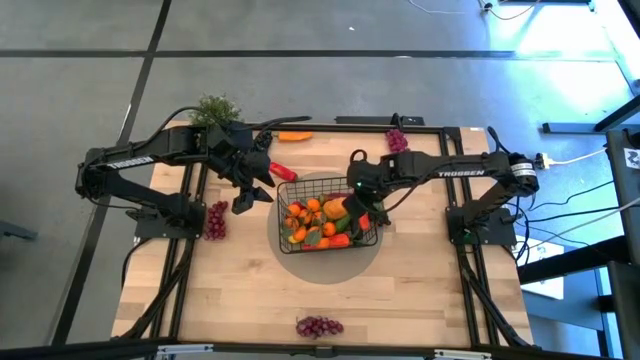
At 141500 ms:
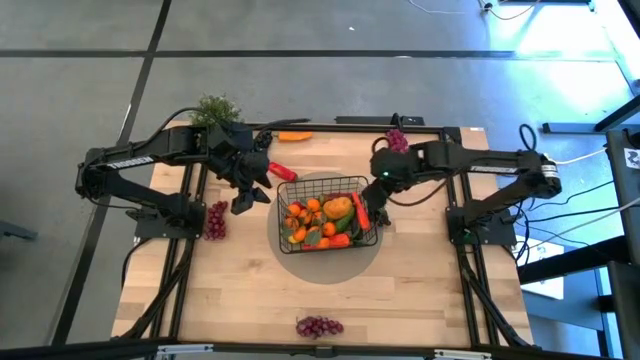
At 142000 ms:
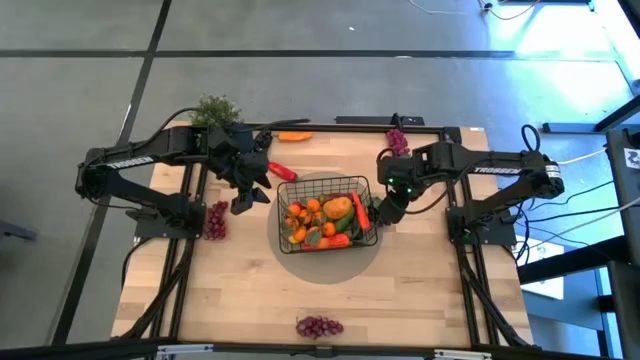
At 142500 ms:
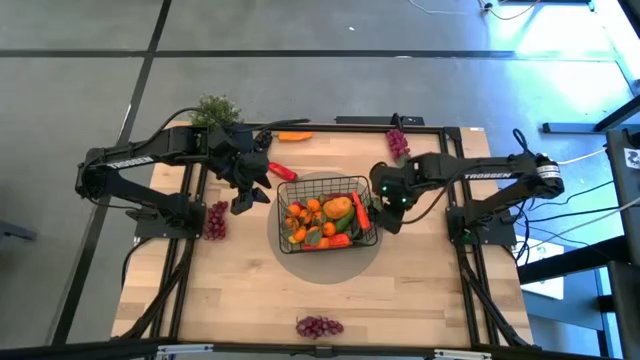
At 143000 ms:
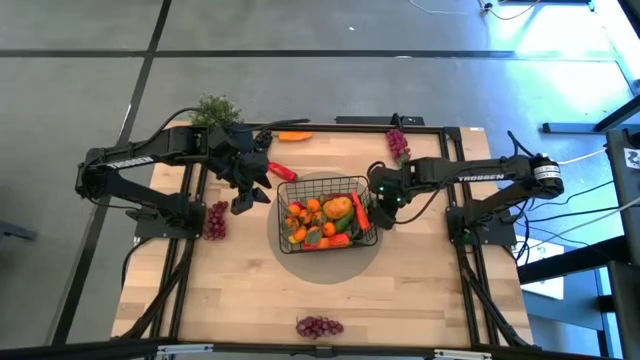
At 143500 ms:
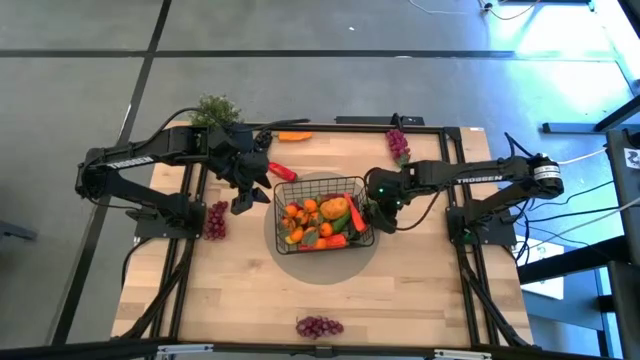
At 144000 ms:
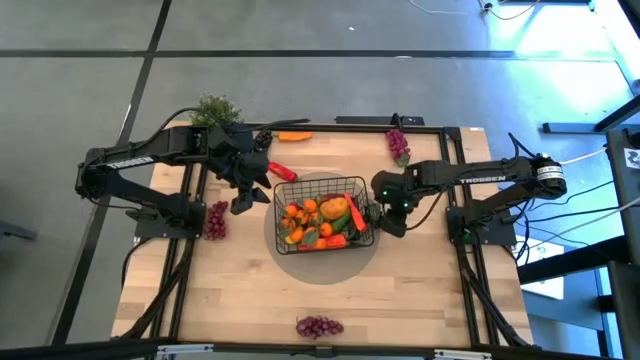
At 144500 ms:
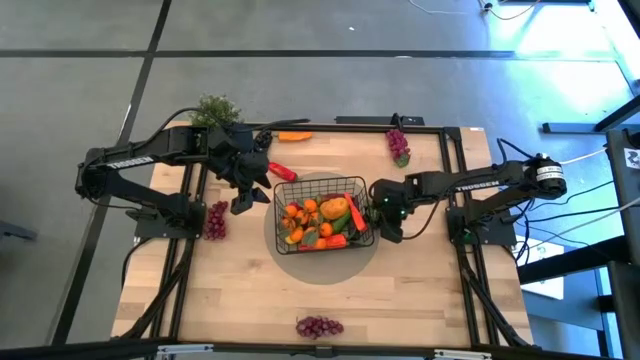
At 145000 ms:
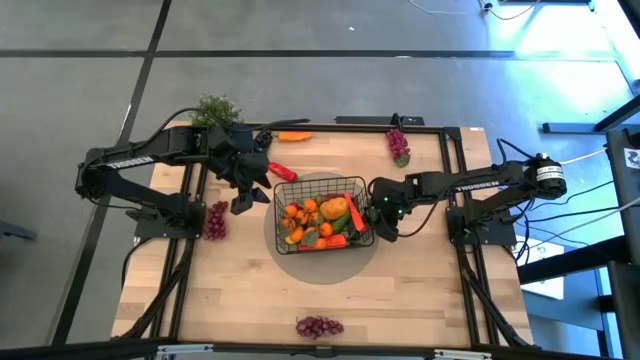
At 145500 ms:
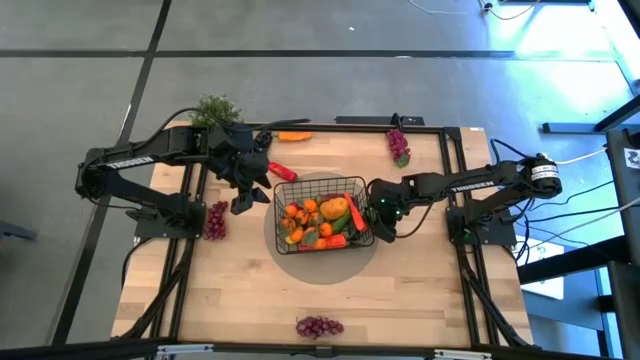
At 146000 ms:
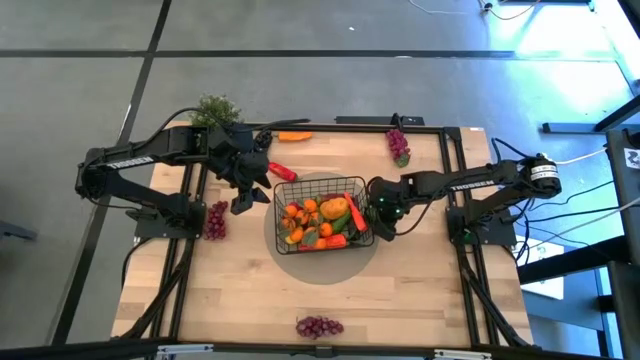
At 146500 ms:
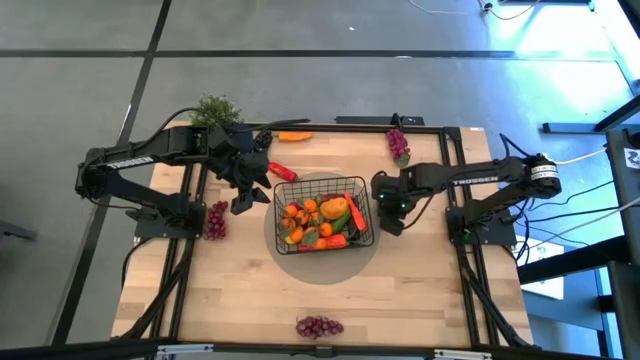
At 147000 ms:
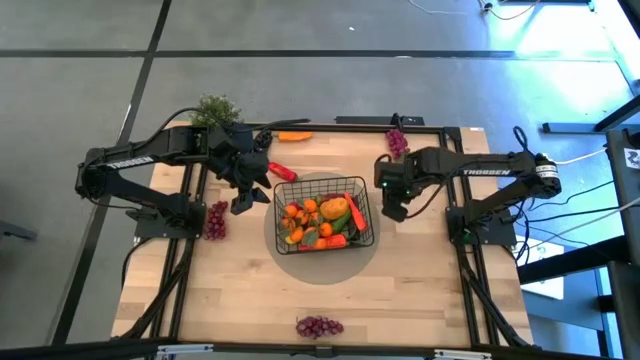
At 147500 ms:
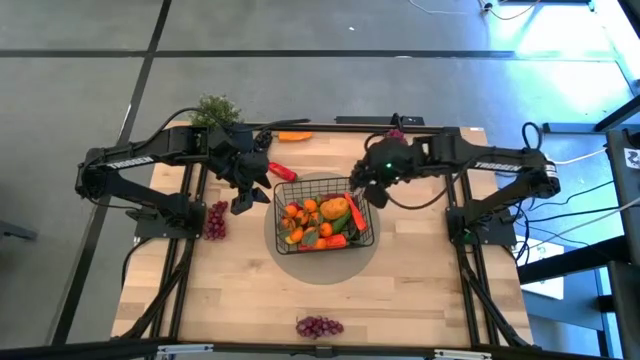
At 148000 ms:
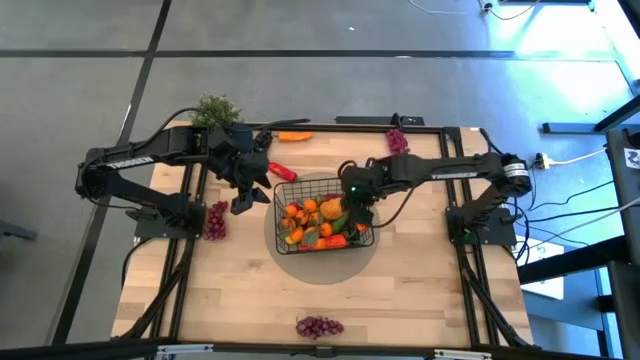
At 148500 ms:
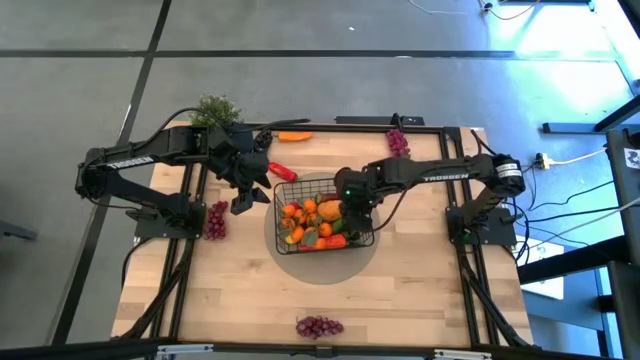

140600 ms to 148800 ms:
Task: Build produce basket
Put the right dark blue grape into the basket

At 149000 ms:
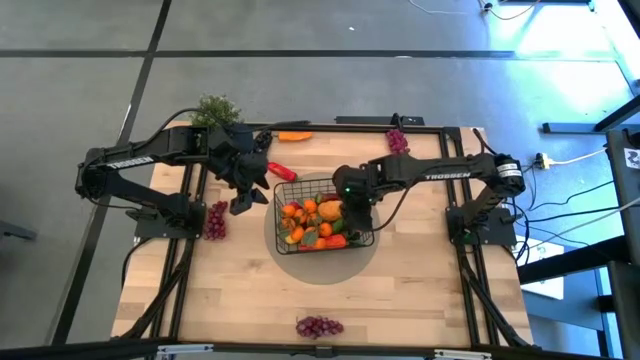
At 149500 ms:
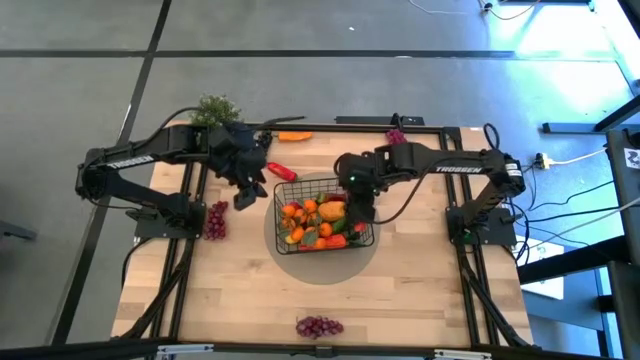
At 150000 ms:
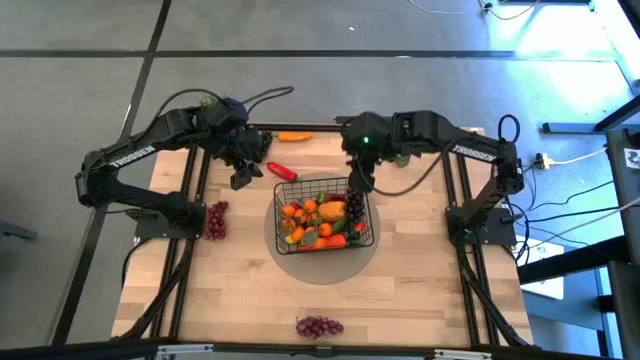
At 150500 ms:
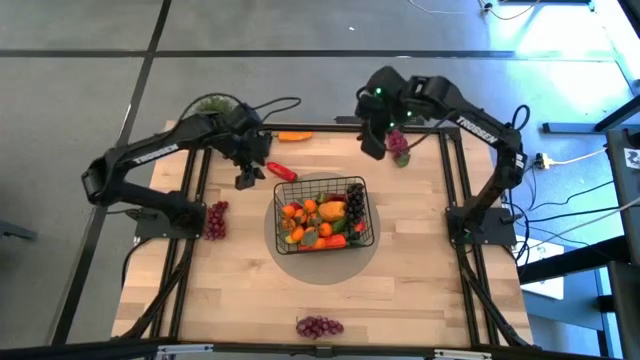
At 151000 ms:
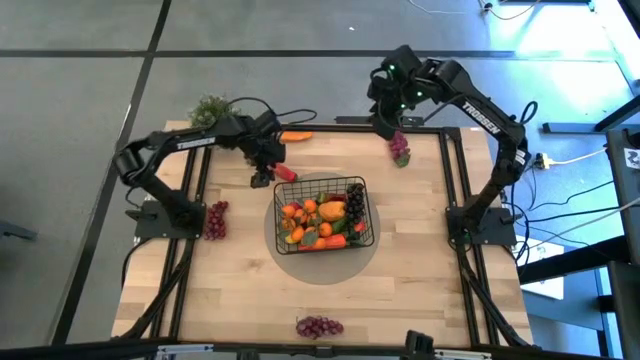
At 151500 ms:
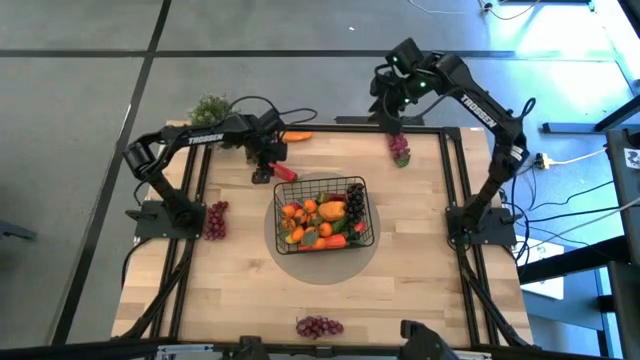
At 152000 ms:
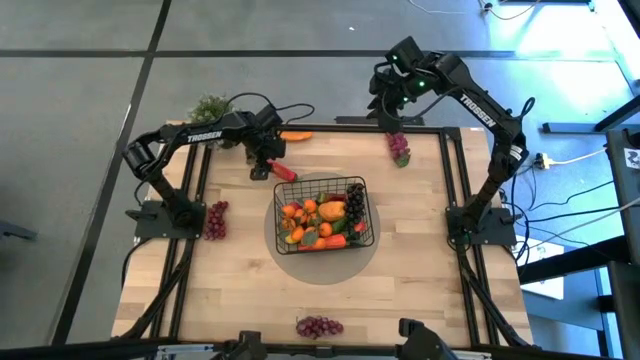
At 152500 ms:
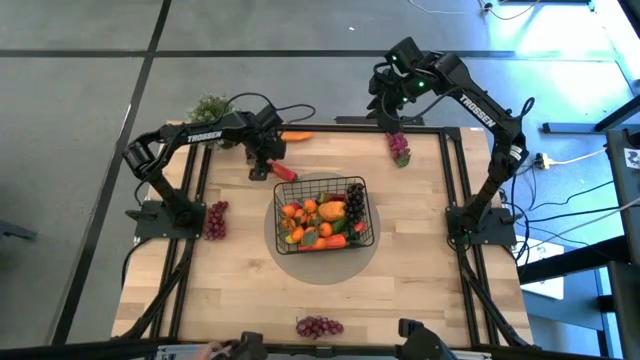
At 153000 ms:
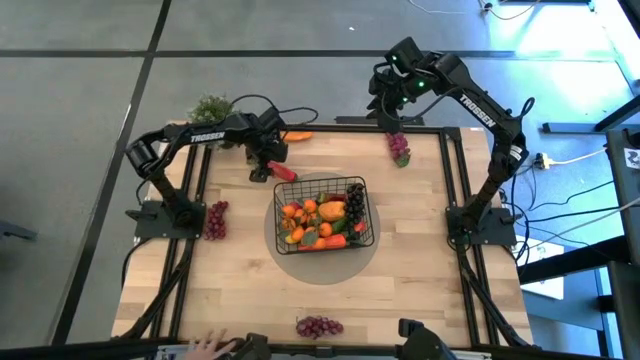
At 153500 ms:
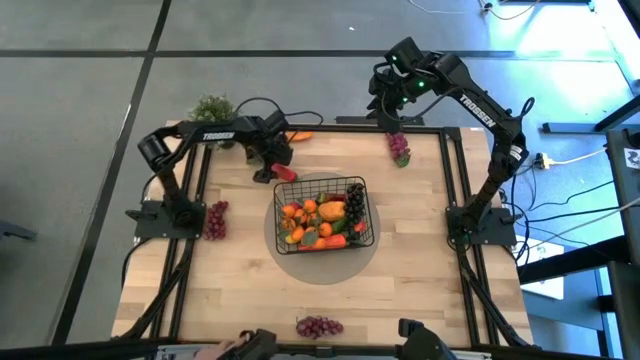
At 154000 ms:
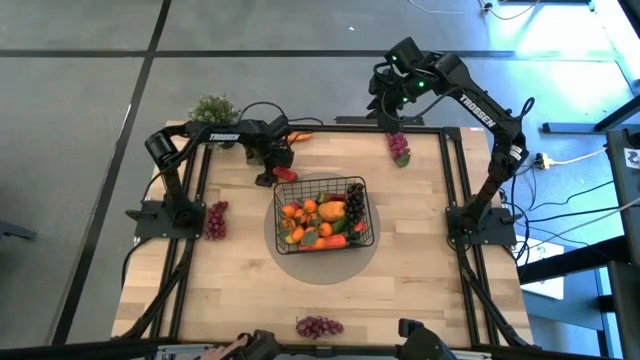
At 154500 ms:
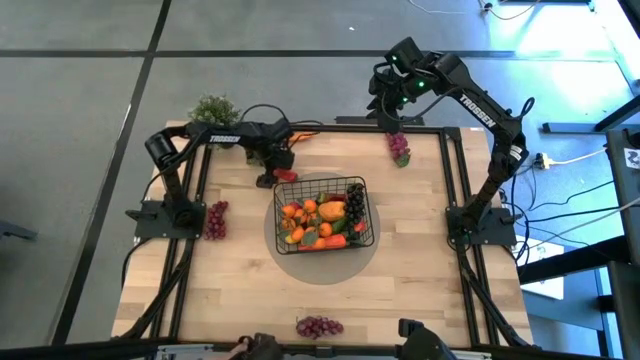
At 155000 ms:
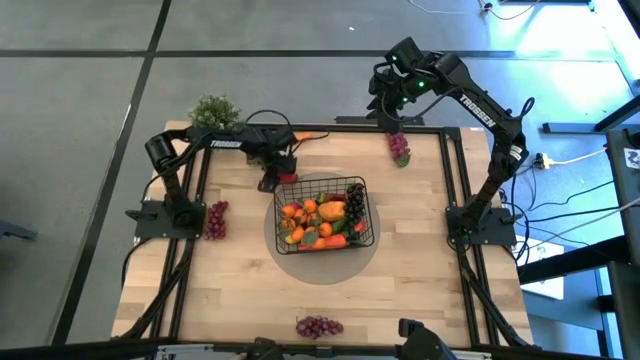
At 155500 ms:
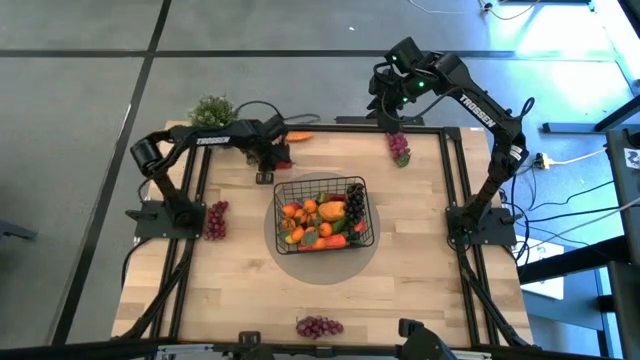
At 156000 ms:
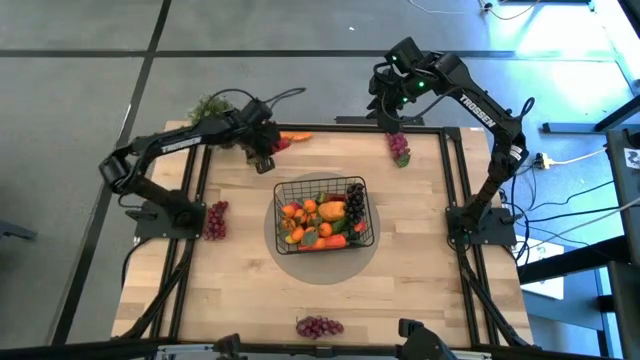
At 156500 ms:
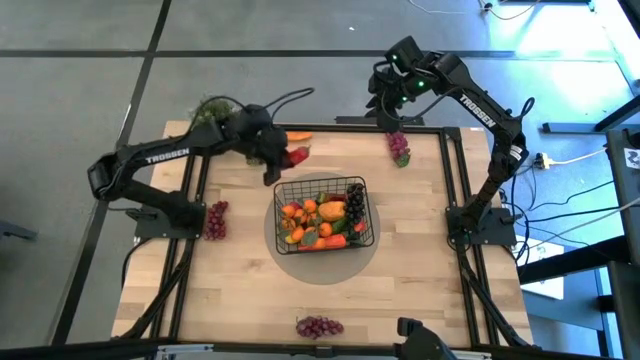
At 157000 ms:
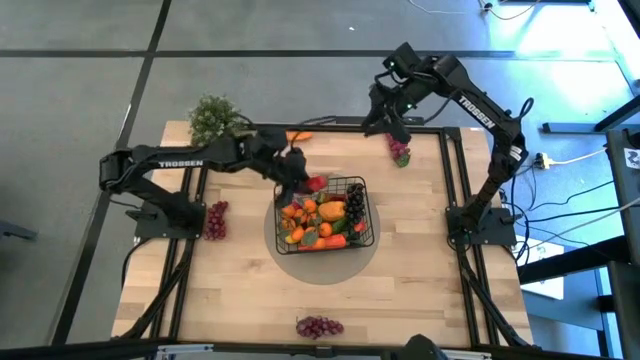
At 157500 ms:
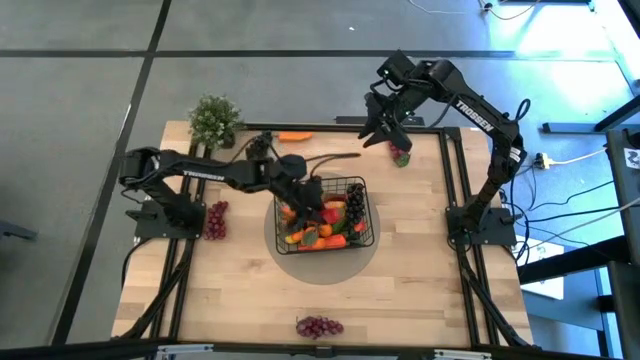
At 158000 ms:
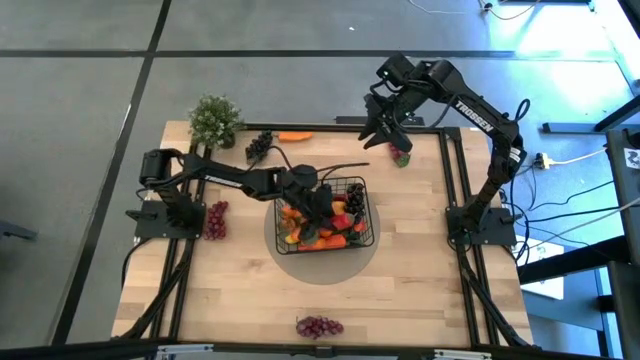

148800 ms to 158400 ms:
Put the red chilli pepper into the basket

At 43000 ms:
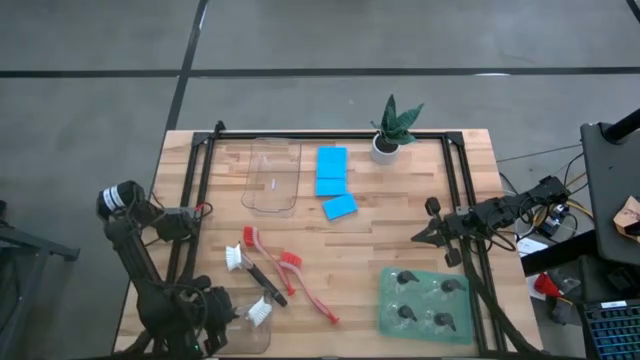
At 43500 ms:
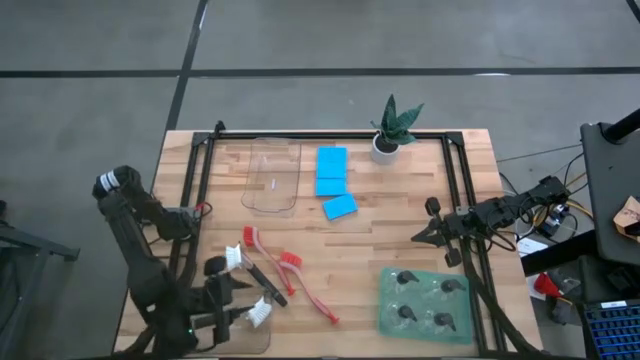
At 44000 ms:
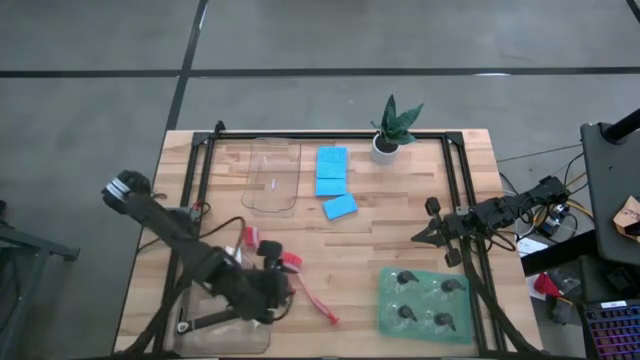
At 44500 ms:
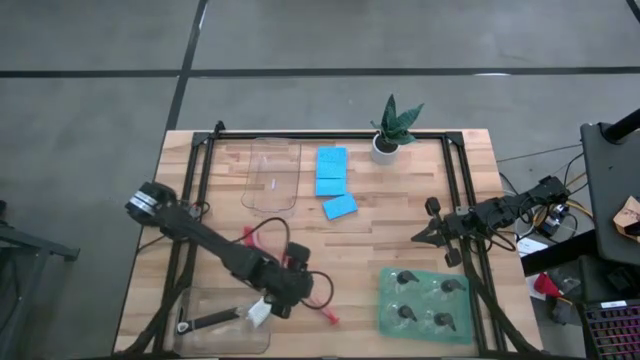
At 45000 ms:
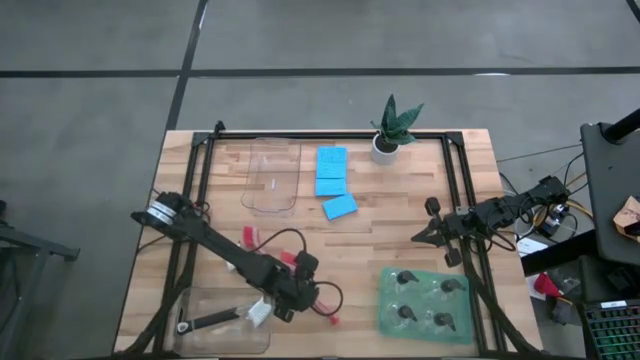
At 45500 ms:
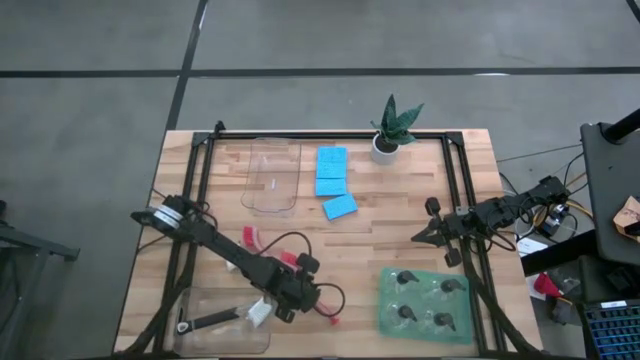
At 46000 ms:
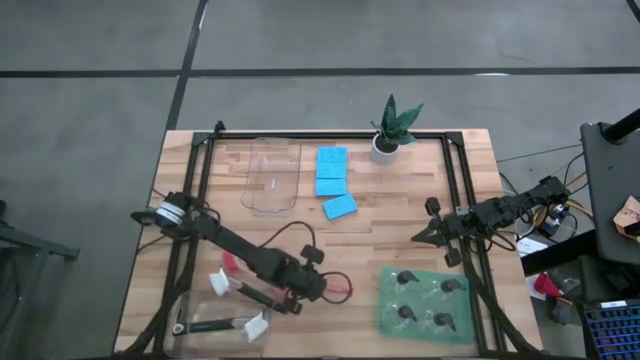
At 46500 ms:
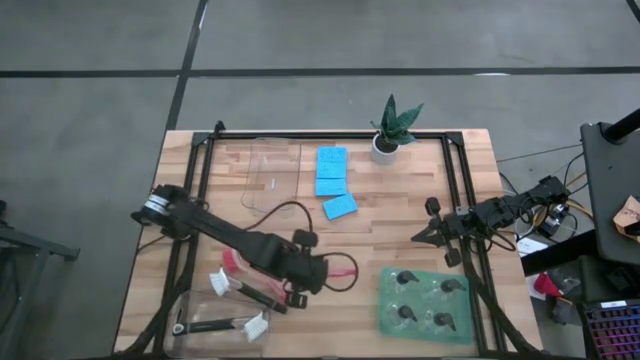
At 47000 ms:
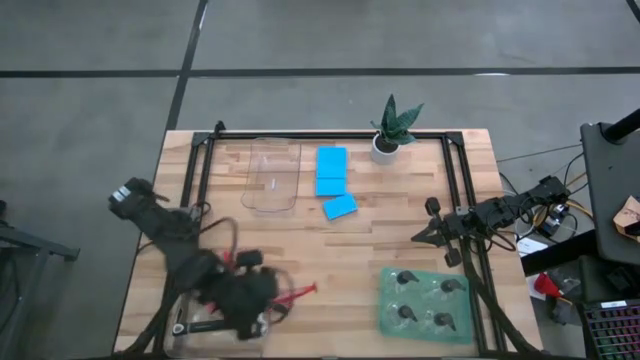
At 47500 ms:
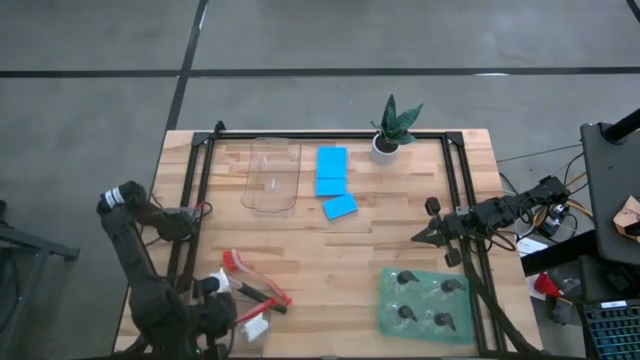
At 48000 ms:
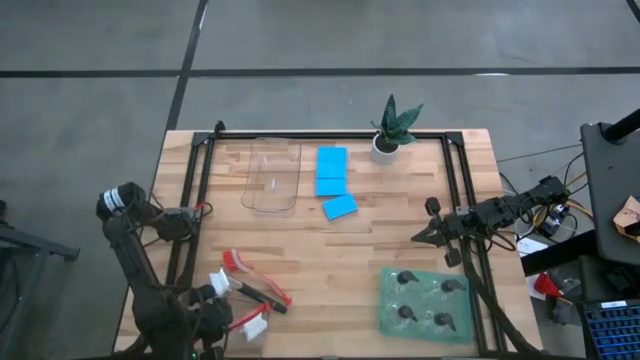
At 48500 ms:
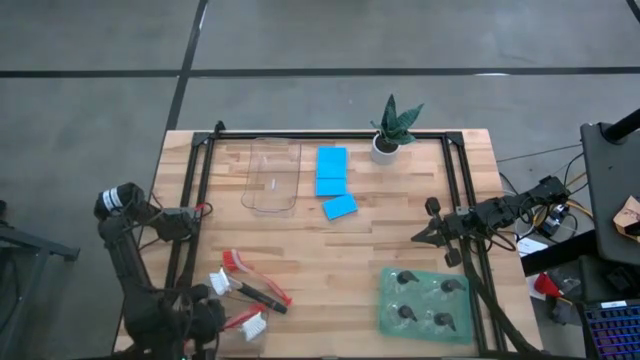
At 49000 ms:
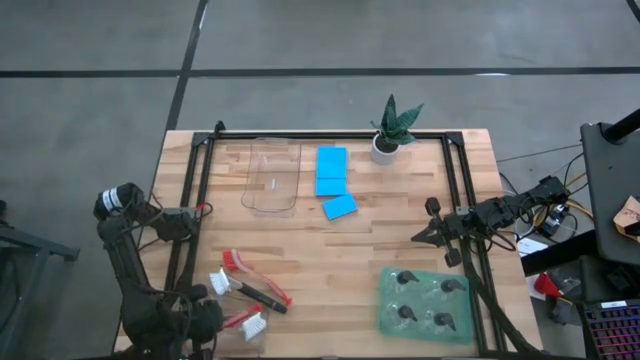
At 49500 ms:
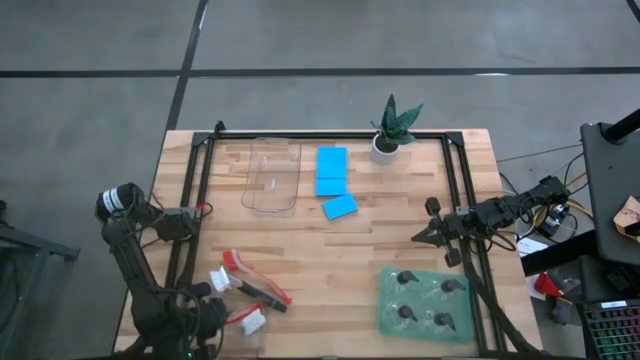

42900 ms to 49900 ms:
Task: Pick & Place Kitchen Sink Supplies
Put the red dish brush into the bottom transparent bin
